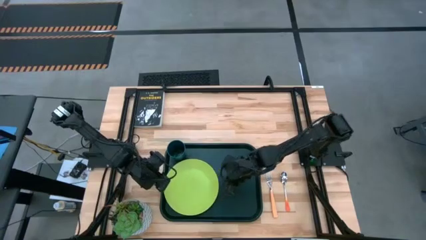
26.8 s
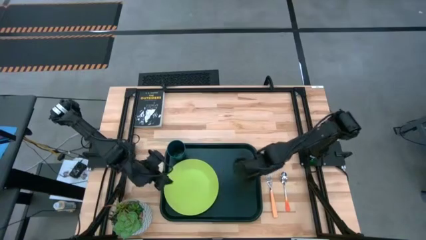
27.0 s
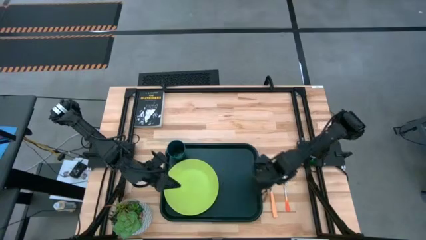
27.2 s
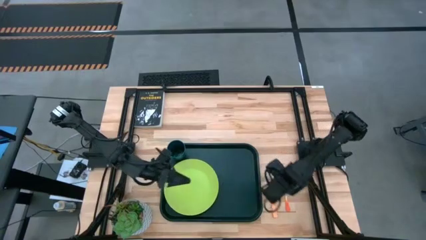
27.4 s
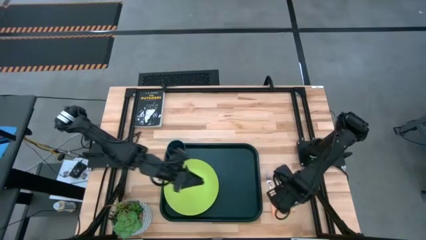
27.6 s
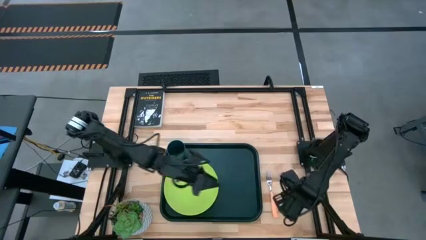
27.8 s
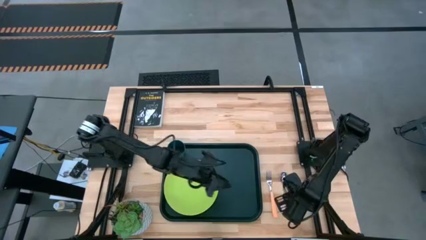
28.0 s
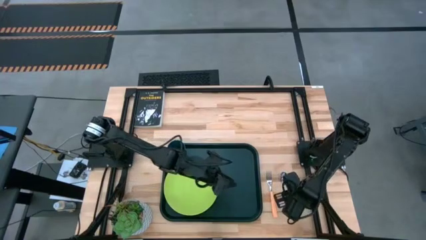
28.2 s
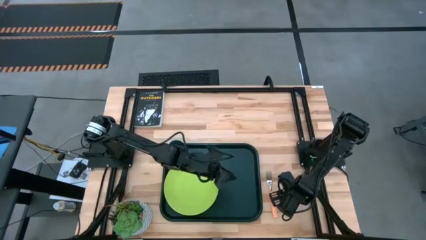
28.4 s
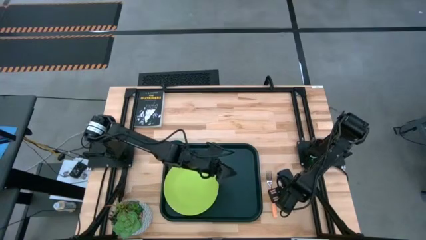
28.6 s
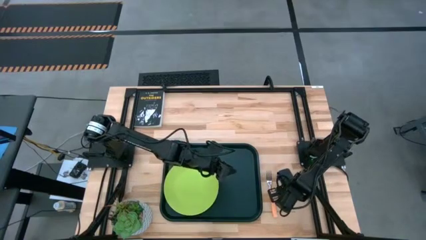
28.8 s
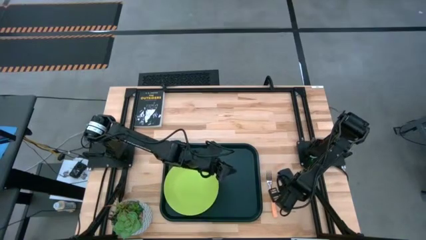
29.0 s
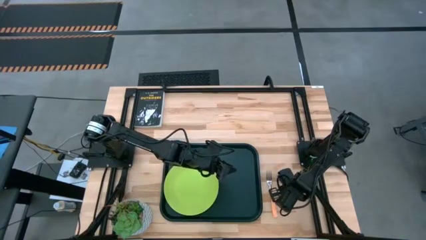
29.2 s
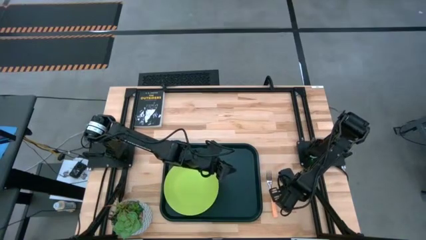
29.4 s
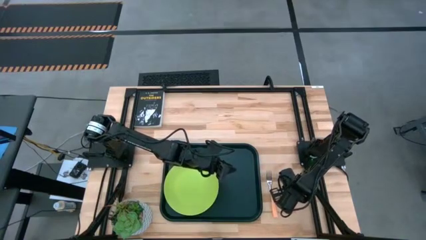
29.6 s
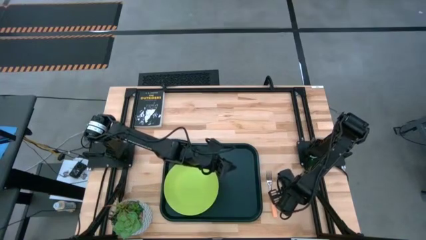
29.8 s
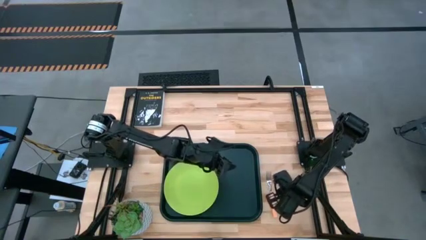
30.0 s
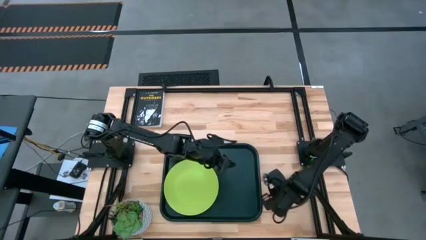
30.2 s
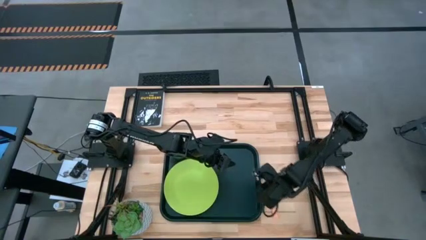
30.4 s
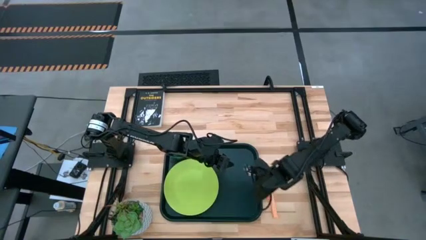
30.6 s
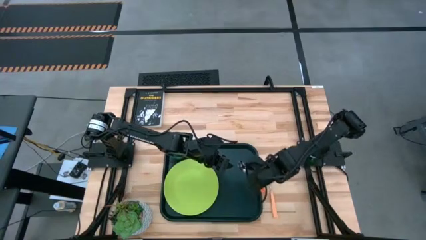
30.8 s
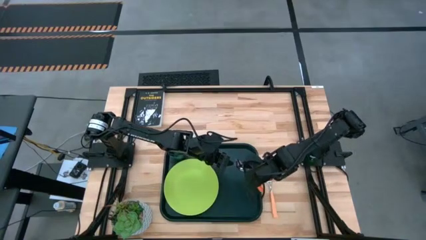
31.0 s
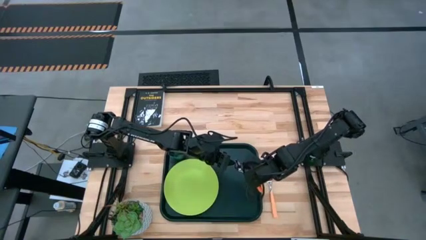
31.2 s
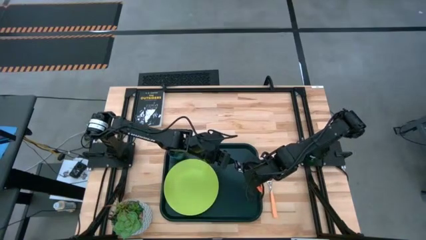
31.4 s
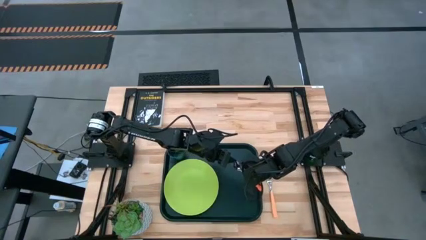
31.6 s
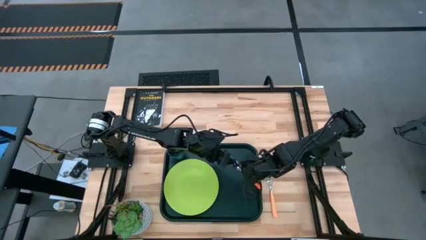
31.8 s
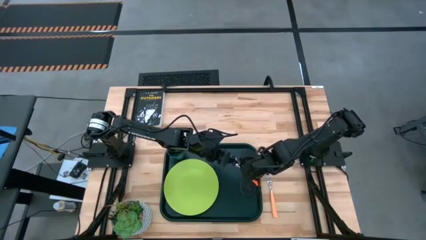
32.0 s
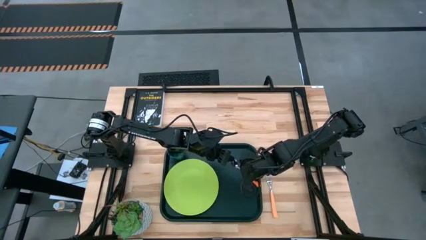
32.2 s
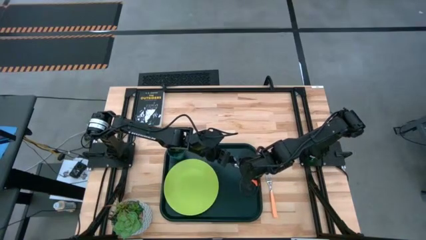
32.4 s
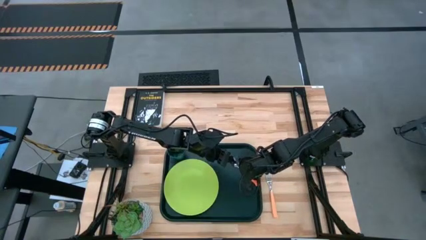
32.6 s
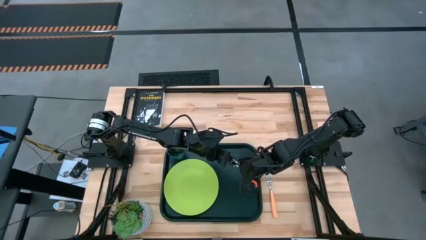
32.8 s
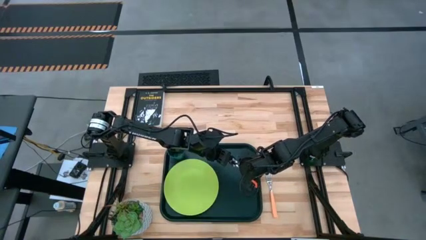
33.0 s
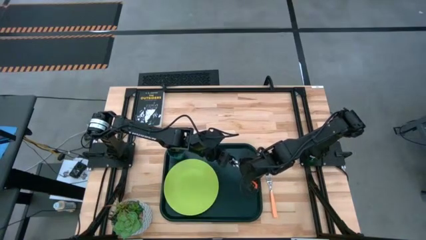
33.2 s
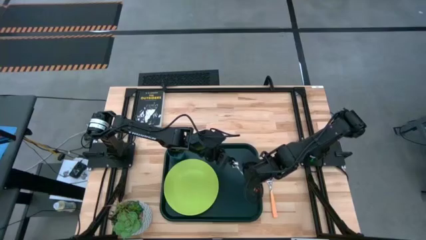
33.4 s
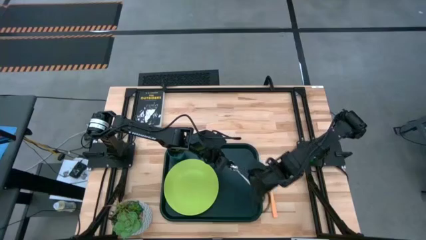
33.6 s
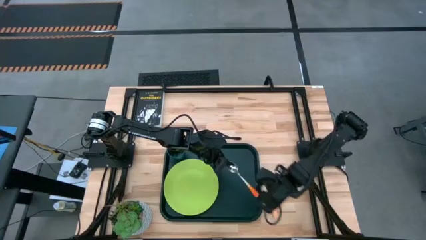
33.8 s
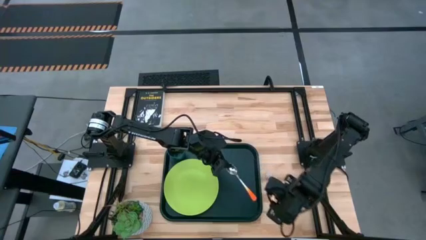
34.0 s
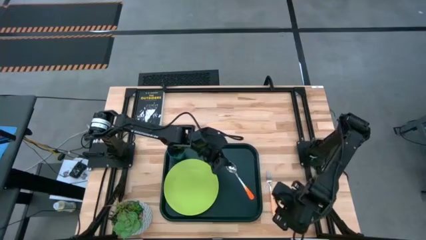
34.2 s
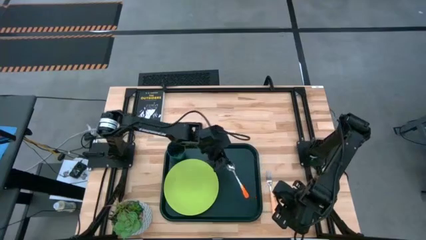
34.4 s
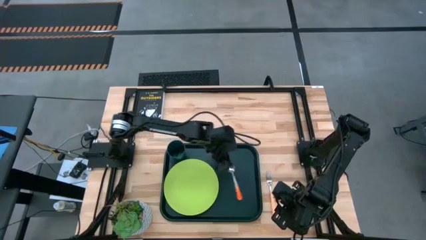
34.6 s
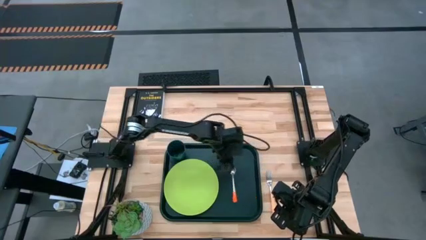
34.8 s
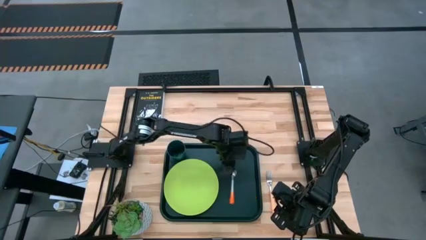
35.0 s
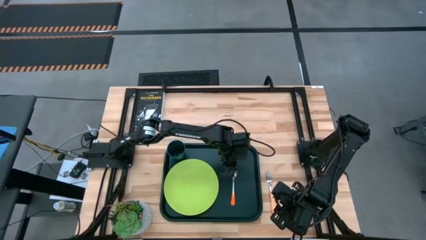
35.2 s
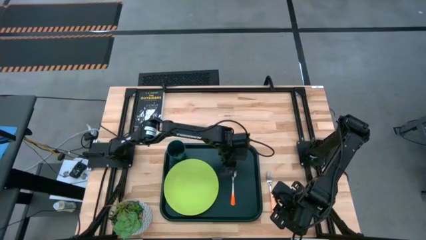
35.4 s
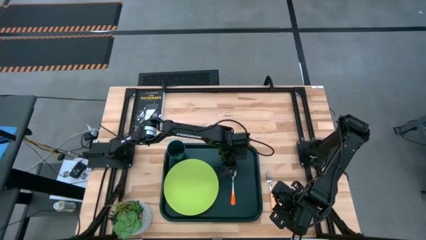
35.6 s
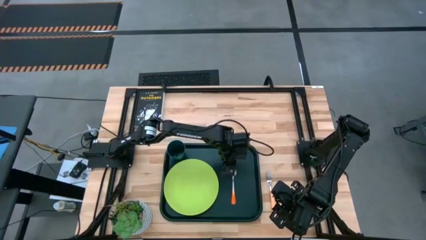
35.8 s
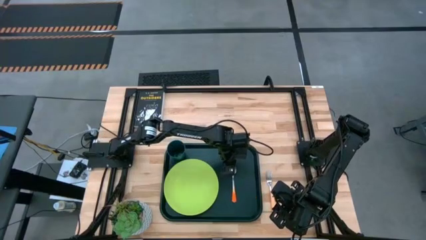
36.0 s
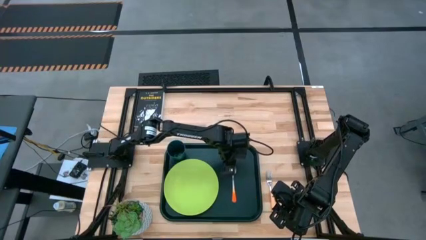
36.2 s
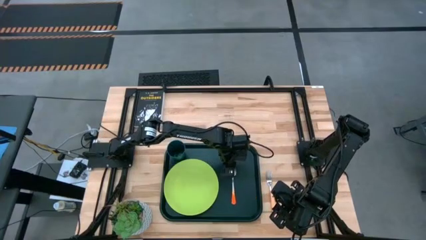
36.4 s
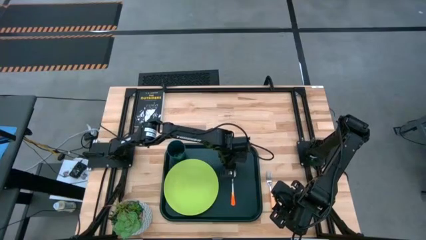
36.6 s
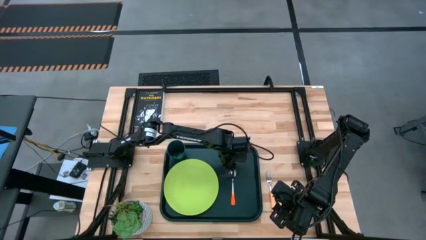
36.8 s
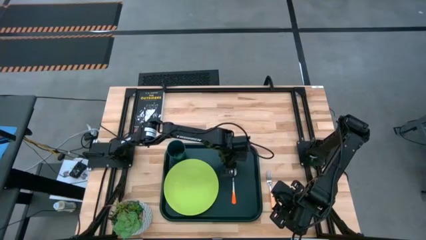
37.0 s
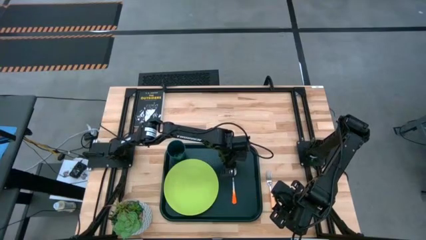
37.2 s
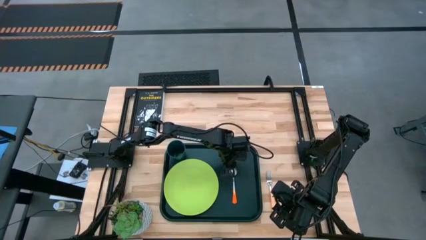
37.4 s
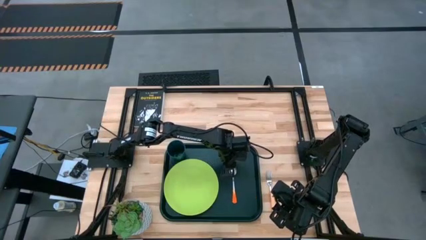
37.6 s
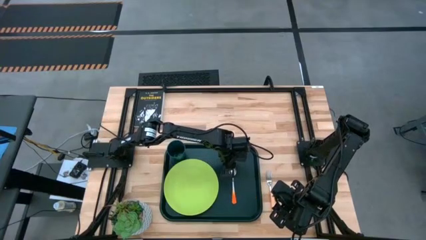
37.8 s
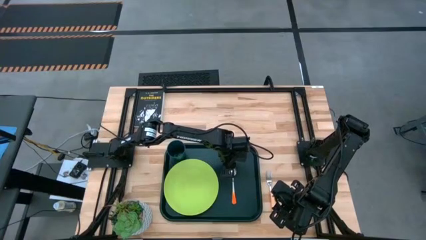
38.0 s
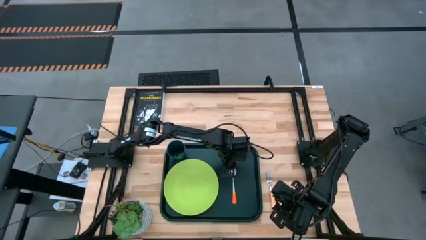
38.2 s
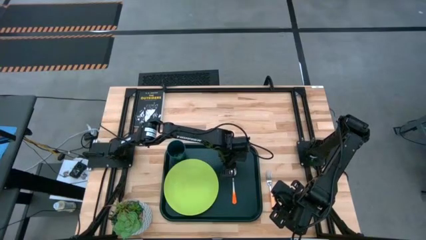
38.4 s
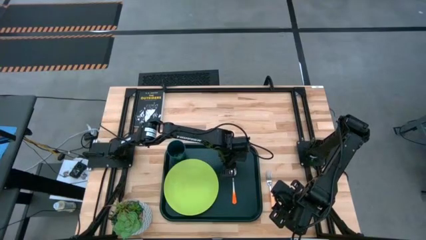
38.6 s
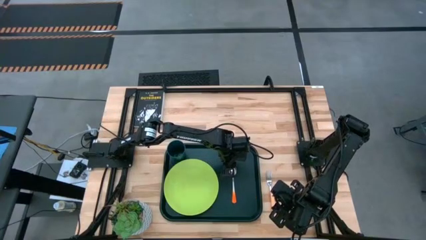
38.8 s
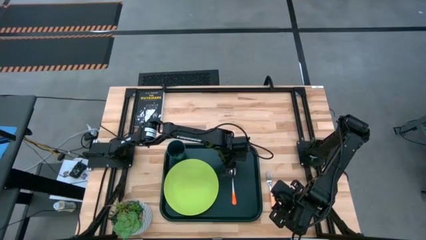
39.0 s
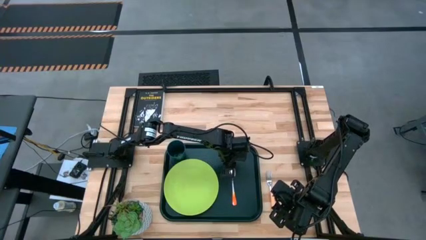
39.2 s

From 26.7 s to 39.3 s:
Task: Pick and place plate/cup/fork/spoon on tray
Put the orange spoon on the black serving tray
